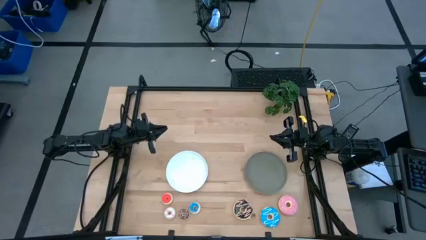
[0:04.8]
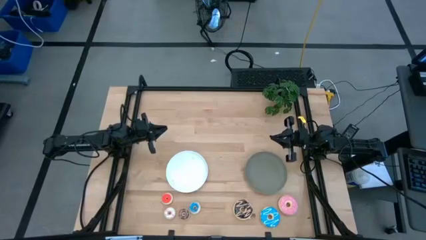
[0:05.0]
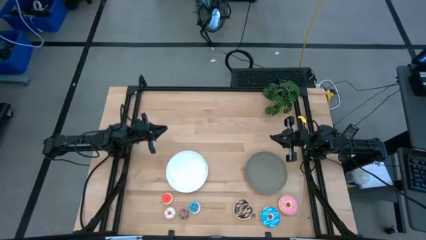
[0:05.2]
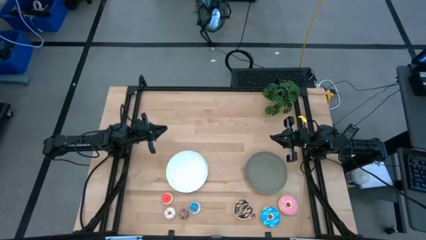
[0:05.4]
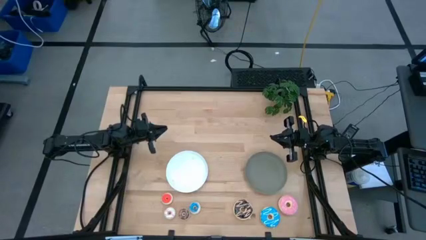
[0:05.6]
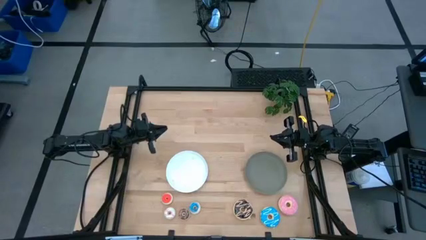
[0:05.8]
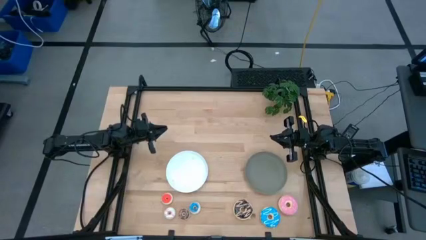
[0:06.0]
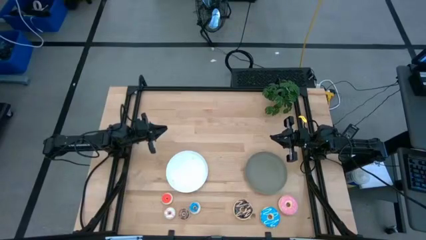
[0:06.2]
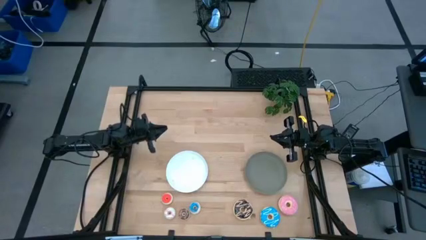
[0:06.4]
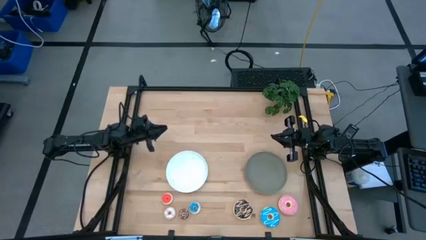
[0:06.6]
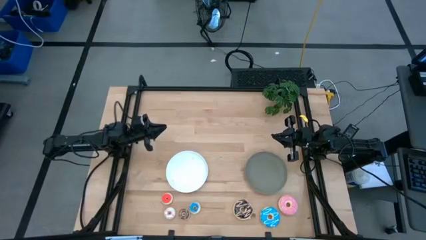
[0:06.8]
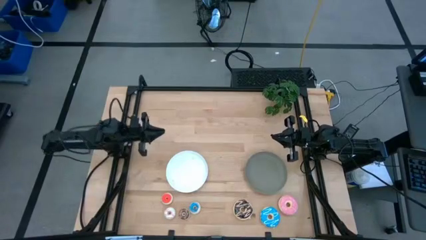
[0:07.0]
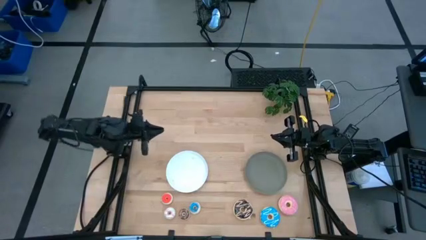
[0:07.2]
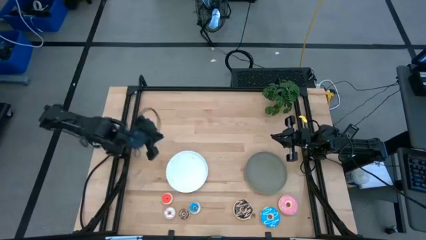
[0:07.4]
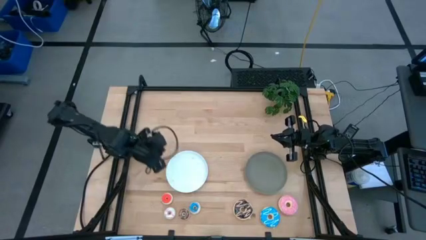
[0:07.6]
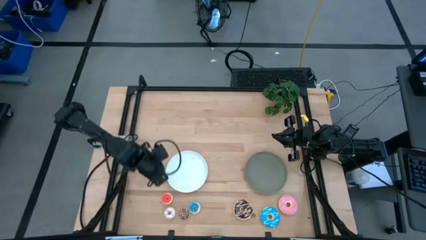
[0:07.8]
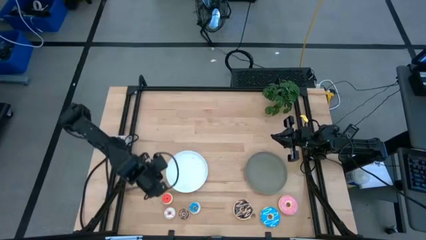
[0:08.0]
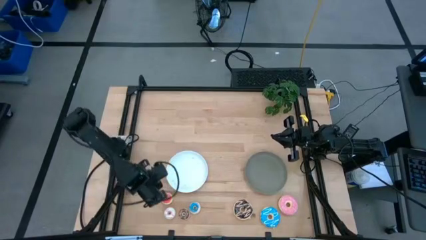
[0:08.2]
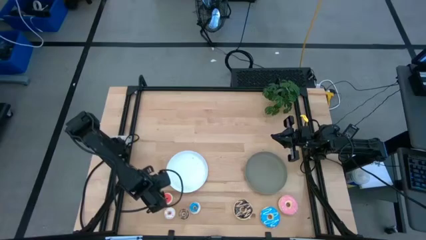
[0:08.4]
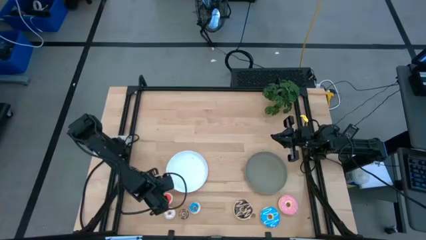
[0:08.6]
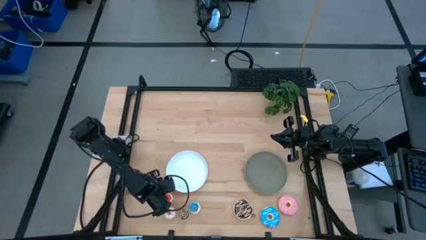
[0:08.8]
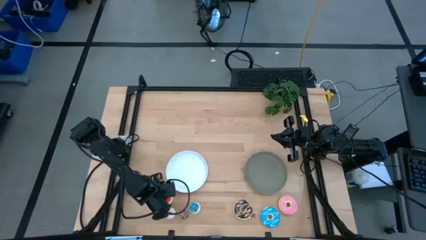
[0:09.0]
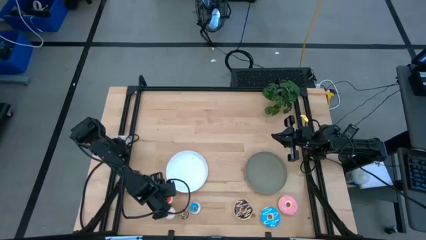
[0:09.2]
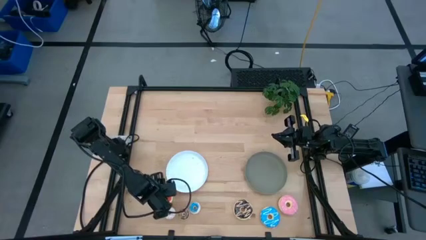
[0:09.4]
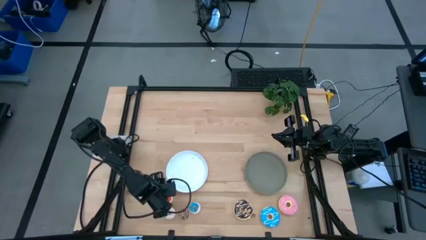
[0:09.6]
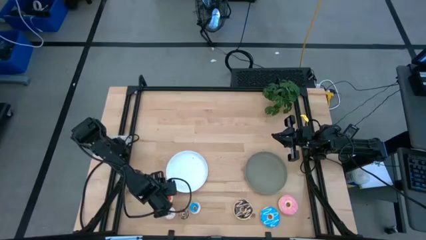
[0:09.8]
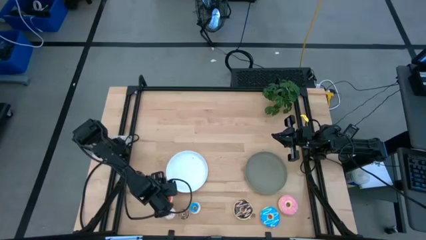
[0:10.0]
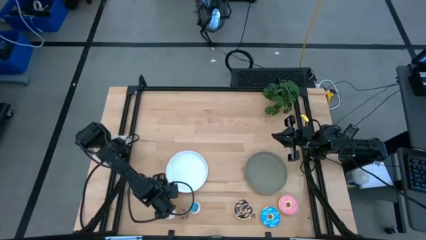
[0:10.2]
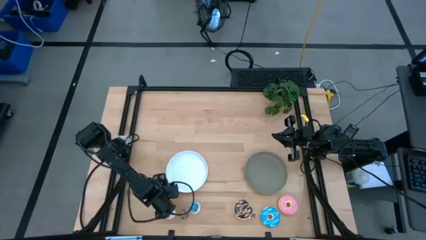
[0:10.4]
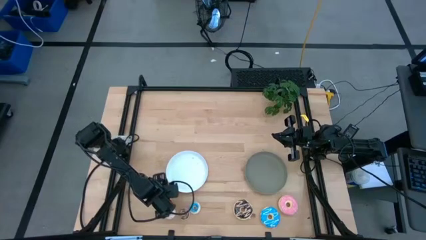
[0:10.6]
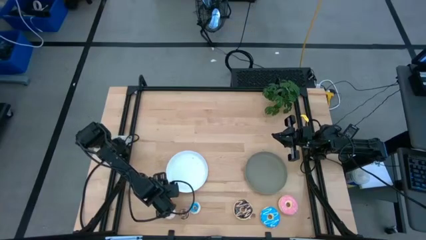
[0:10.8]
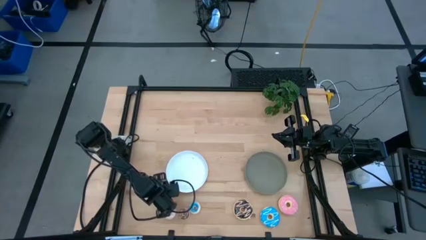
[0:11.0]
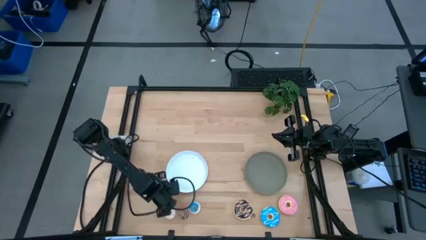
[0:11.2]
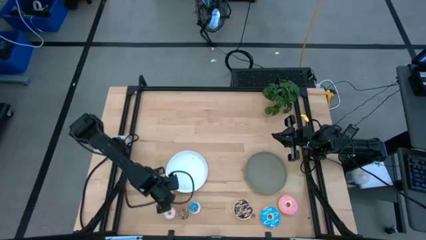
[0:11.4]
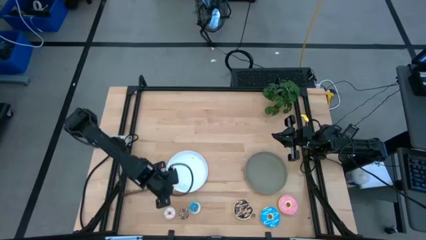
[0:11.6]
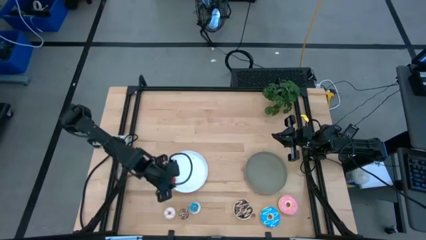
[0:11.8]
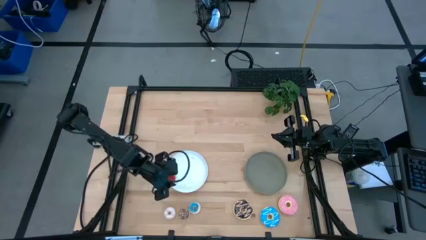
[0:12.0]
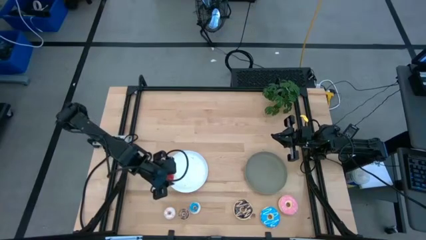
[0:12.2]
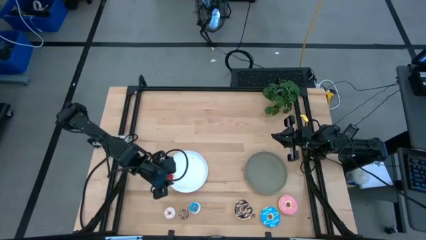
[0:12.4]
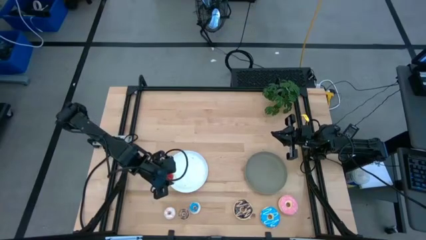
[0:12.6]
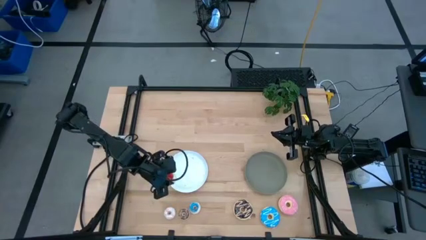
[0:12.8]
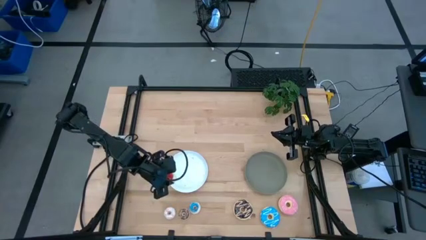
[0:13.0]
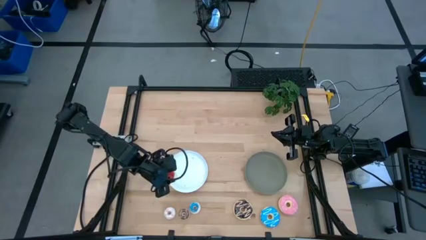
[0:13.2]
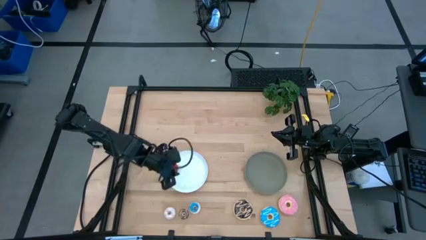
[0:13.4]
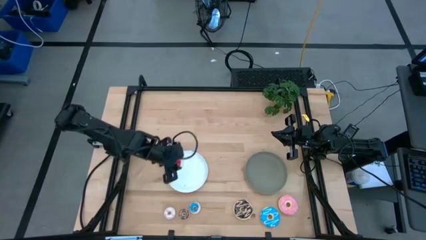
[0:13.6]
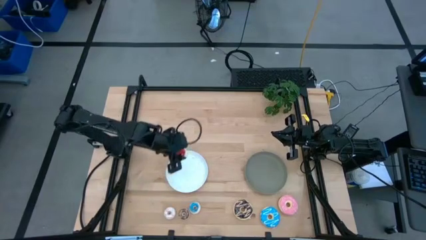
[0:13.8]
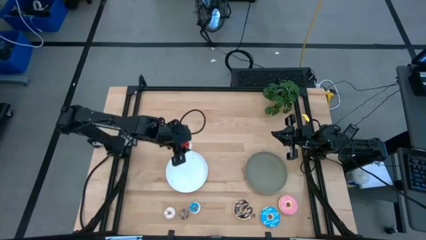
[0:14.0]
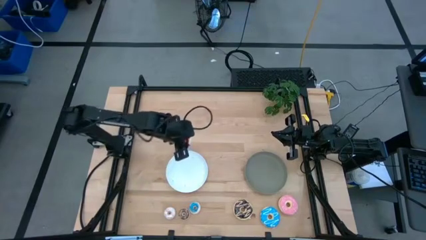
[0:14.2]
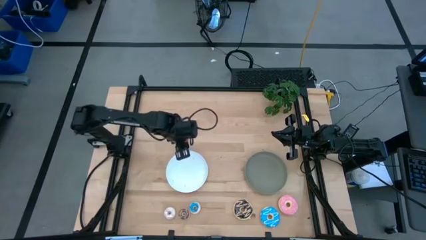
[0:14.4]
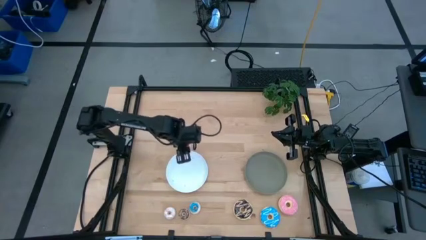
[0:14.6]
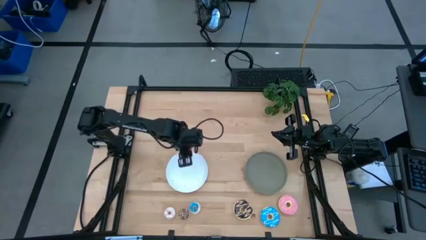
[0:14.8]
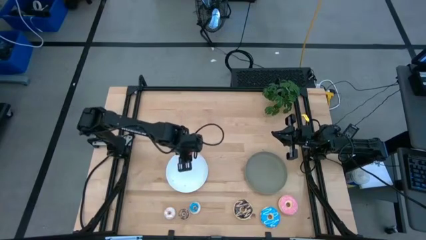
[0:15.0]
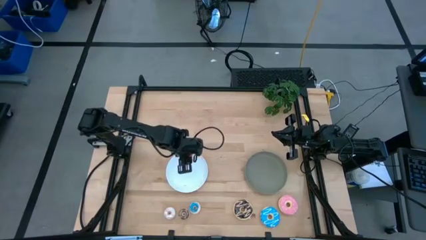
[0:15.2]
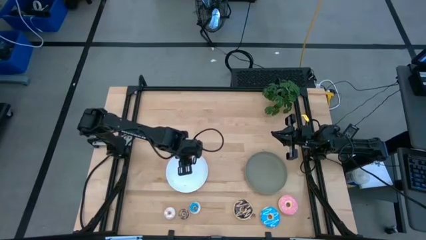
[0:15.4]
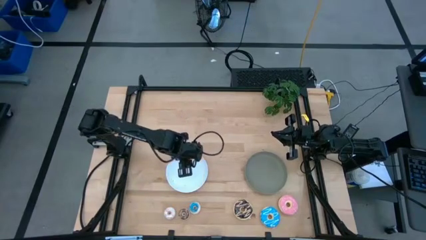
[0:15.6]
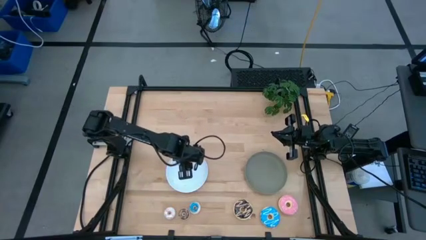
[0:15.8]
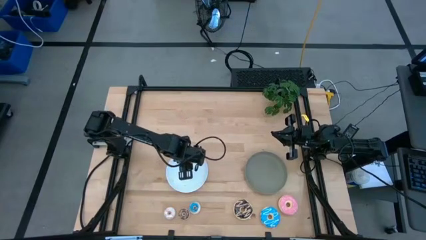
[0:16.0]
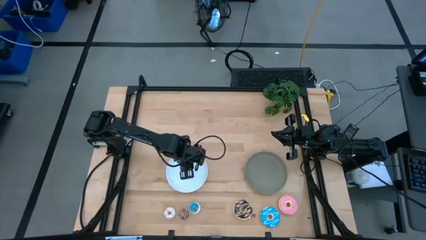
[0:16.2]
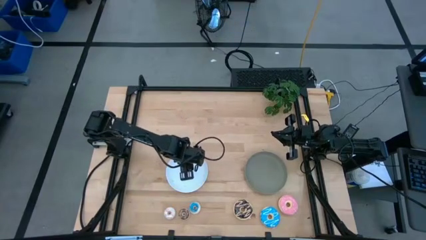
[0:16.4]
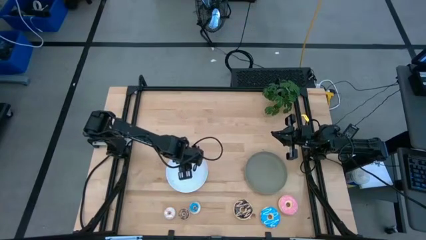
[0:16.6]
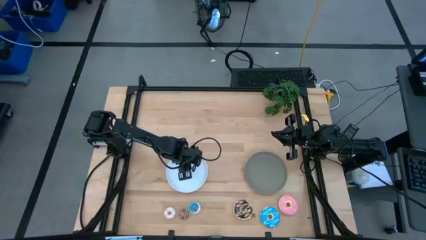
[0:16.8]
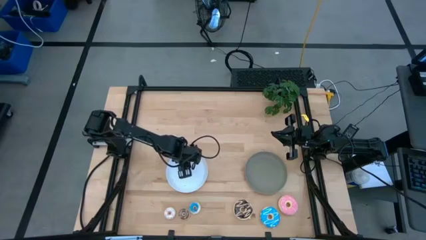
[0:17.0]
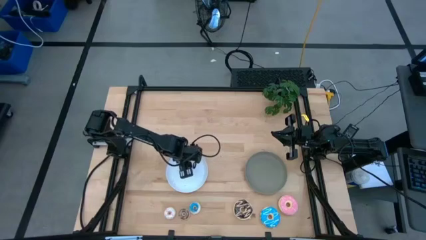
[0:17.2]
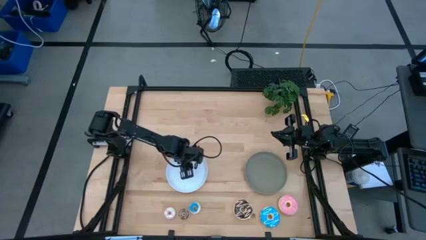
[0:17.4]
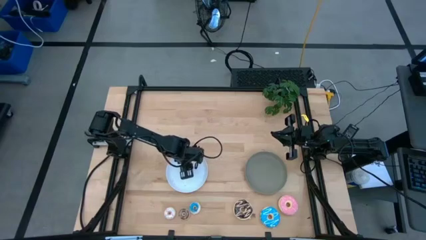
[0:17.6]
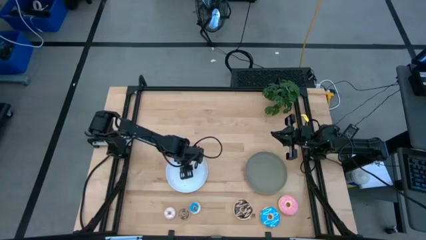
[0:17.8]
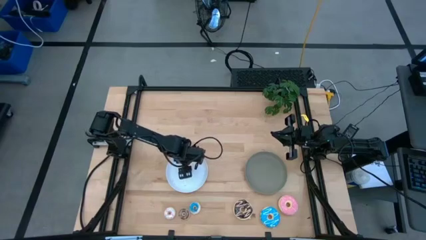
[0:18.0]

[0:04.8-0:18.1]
Task: Pick & Place donuts
Put the small pink donut on the white plate
